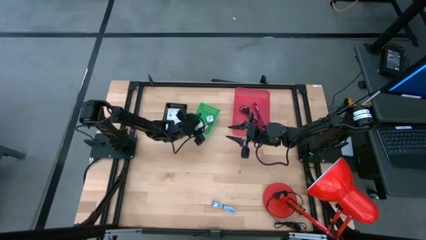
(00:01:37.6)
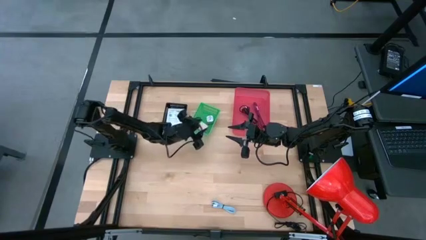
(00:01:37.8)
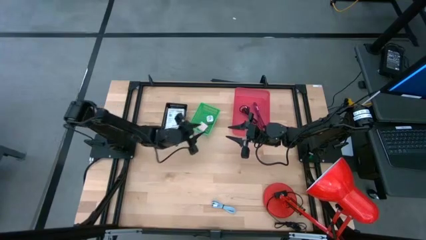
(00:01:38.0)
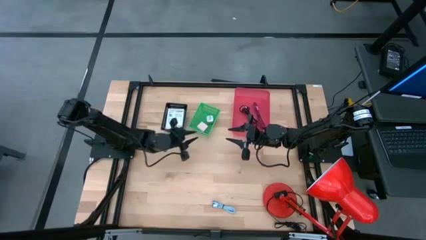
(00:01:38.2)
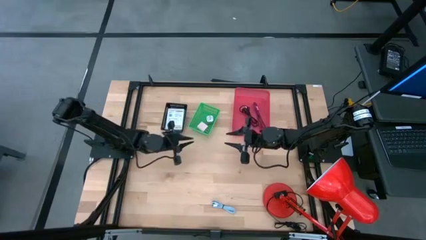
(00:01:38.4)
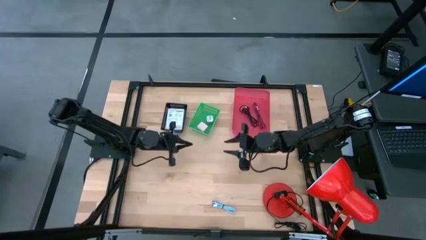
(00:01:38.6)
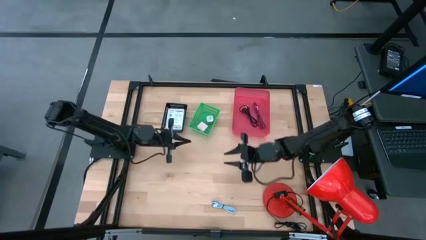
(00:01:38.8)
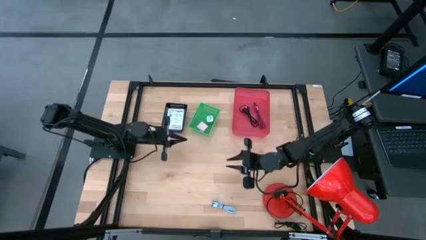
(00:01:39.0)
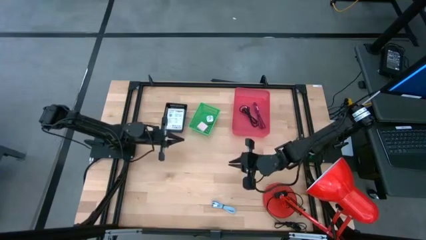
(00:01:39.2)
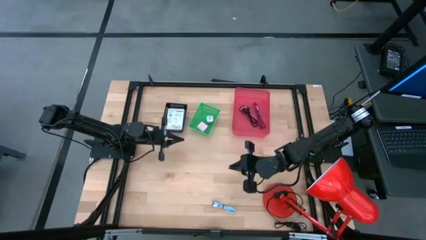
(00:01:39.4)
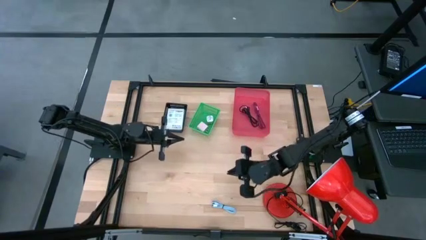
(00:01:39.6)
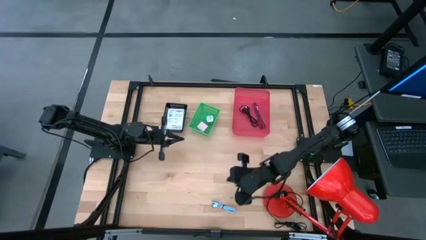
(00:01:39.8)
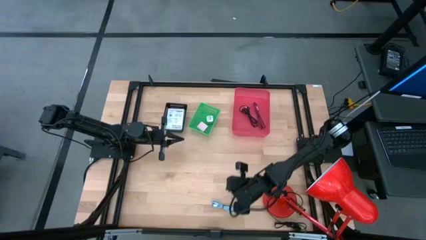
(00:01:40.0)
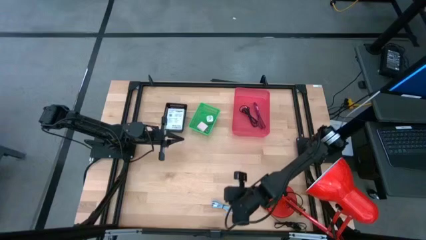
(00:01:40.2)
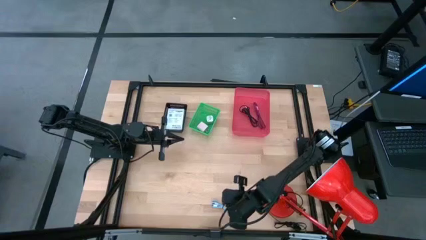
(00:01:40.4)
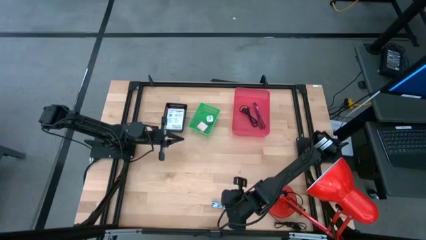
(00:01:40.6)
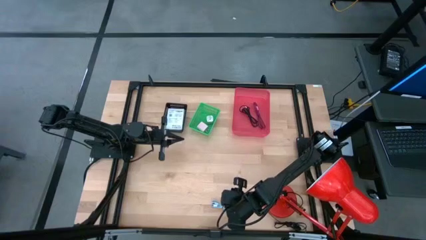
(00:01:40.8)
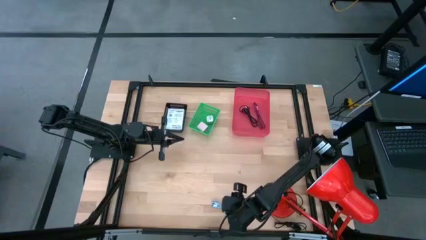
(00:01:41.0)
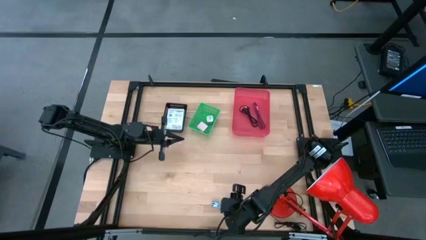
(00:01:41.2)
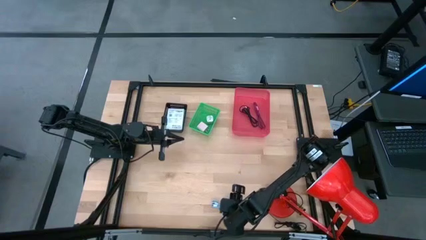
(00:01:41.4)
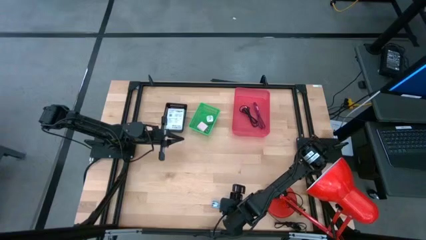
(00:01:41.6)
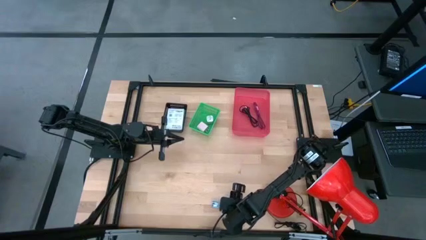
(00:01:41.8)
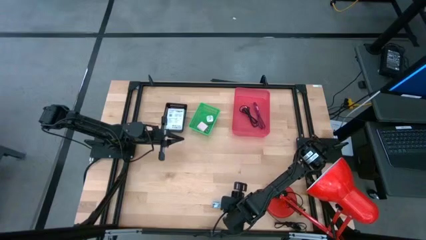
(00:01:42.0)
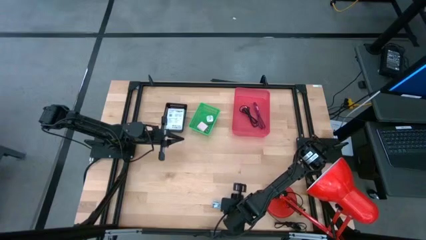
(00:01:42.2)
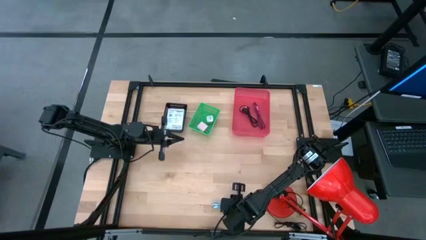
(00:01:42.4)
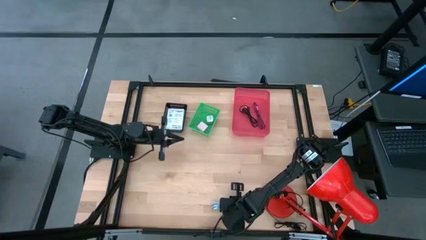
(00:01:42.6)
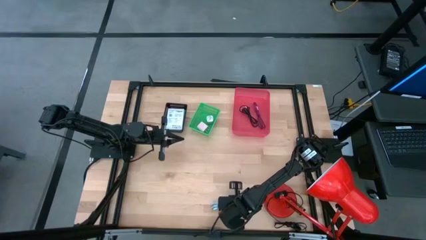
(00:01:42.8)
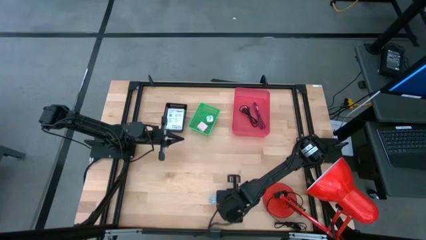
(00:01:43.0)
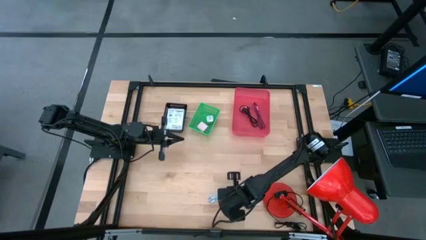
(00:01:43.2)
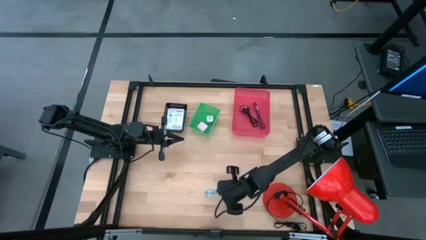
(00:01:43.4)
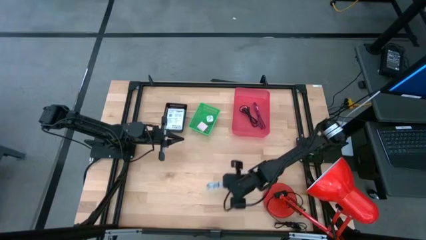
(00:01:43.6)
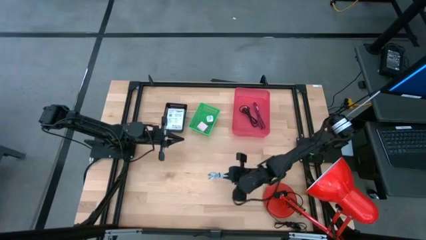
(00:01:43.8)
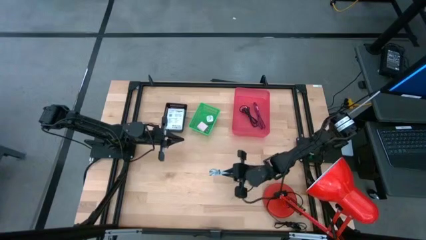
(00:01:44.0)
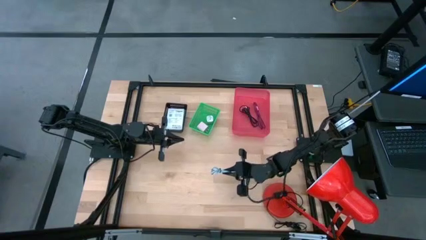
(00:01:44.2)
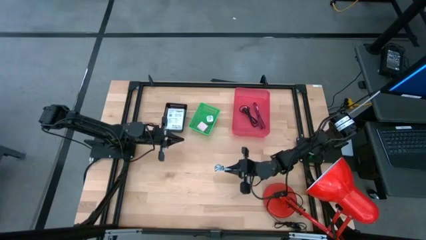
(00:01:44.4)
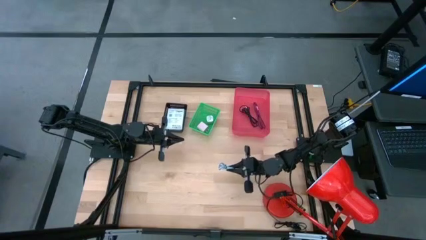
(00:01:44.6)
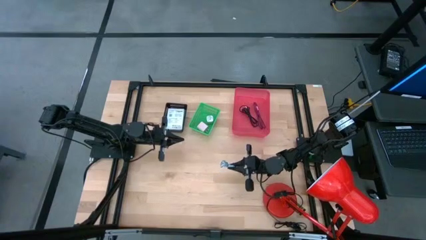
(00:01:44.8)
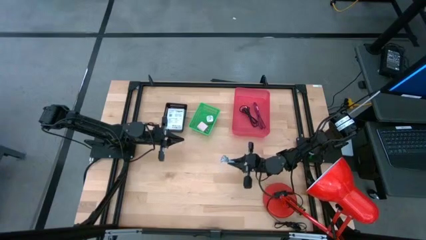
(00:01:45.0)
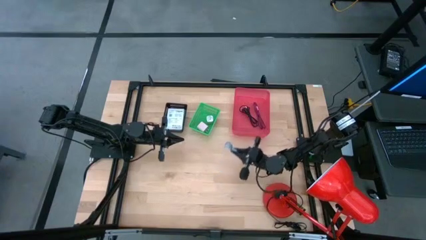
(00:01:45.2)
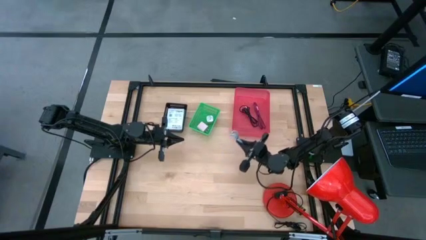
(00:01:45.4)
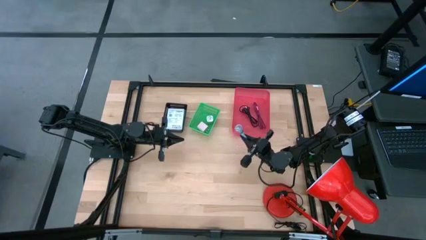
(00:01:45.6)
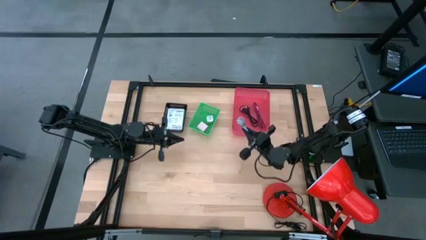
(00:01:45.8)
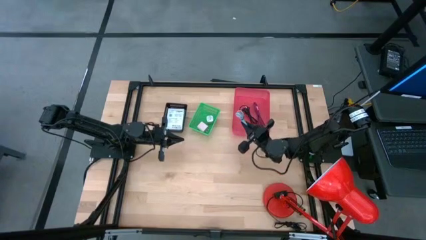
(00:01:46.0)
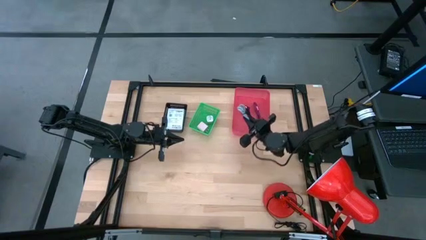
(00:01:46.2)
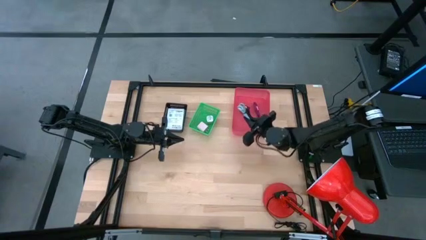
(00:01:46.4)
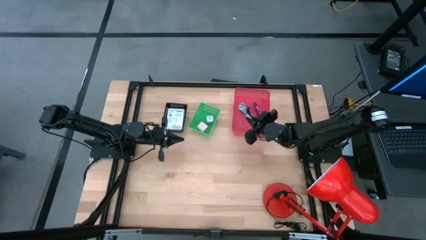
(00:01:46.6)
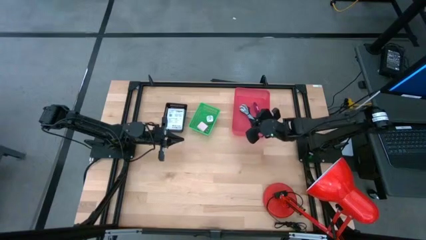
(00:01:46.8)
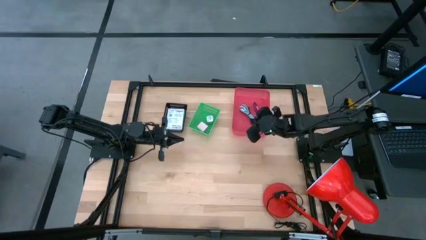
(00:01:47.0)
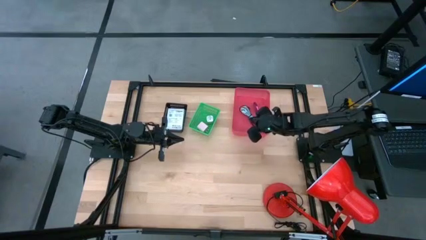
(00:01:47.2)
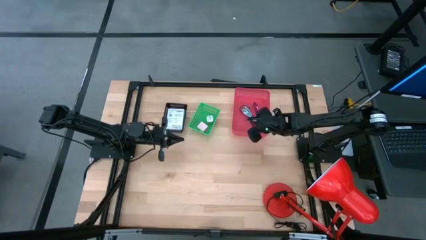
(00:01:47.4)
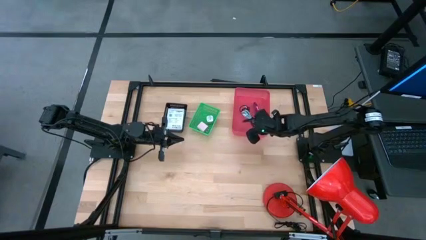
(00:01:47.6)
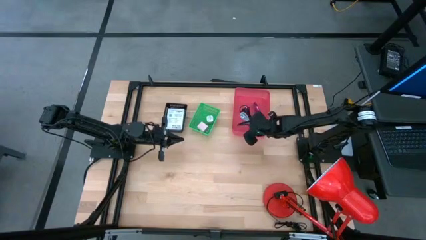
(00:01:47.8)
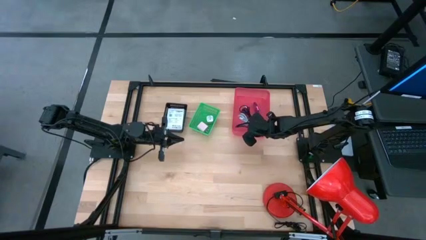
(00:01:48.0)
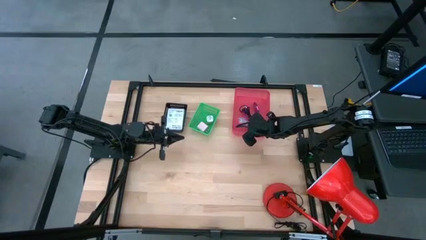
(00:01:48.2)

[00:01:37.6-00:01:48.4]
Task: Pick and place items into bin
Put the blue charger cable into the red bin

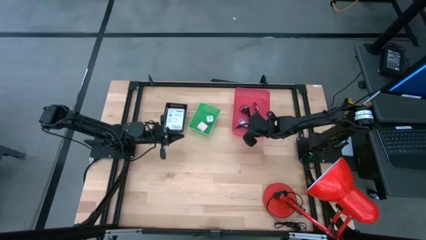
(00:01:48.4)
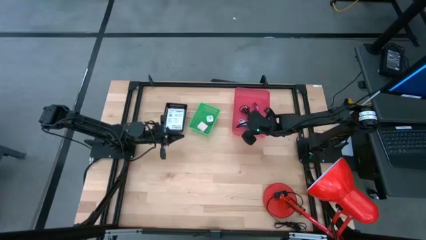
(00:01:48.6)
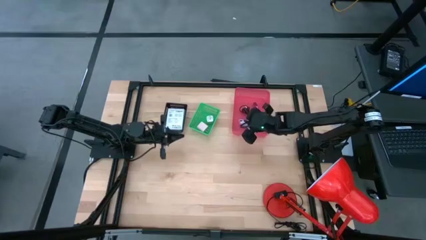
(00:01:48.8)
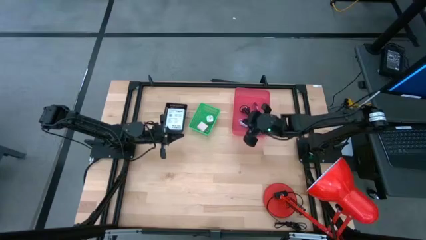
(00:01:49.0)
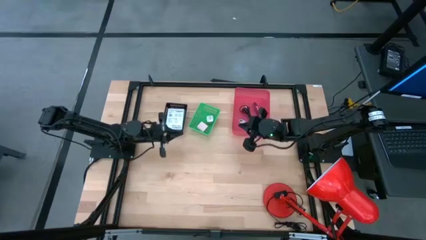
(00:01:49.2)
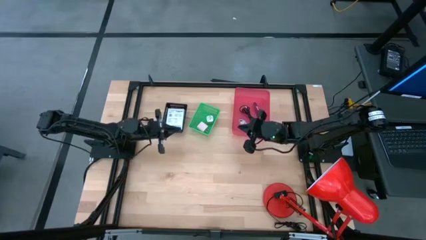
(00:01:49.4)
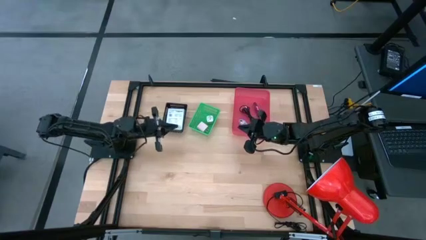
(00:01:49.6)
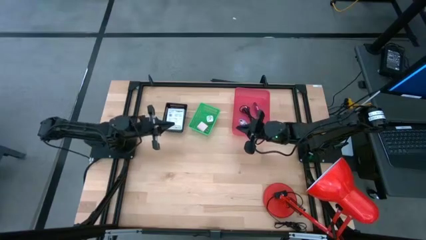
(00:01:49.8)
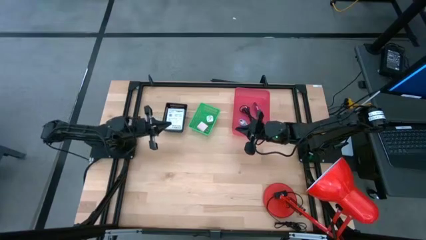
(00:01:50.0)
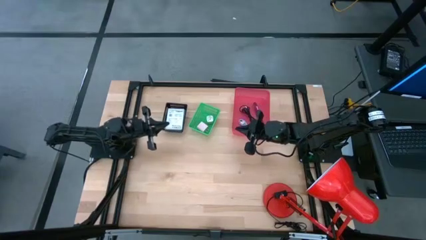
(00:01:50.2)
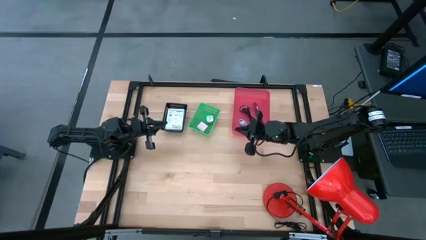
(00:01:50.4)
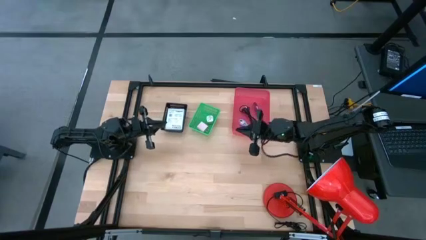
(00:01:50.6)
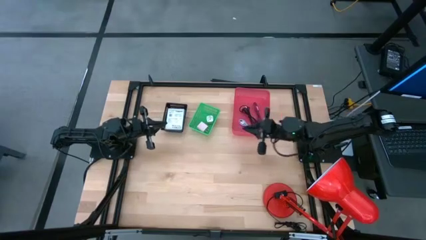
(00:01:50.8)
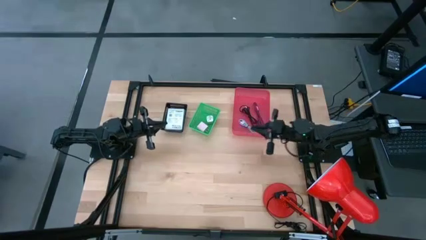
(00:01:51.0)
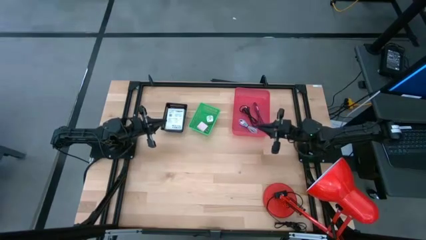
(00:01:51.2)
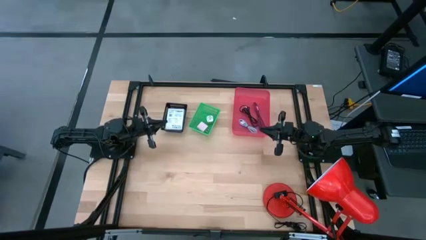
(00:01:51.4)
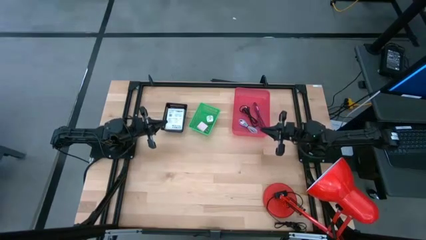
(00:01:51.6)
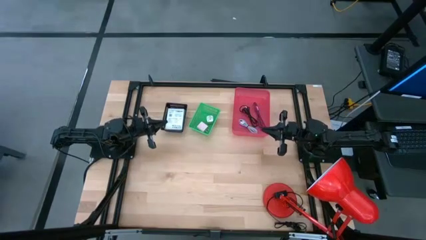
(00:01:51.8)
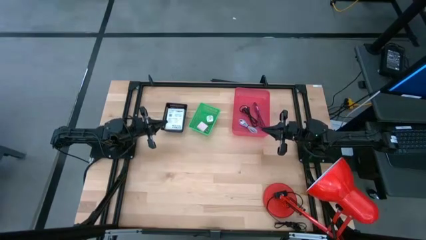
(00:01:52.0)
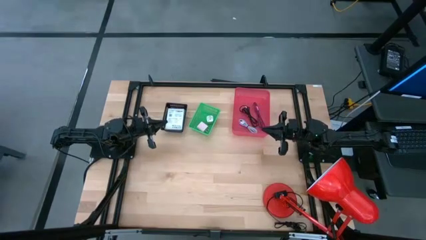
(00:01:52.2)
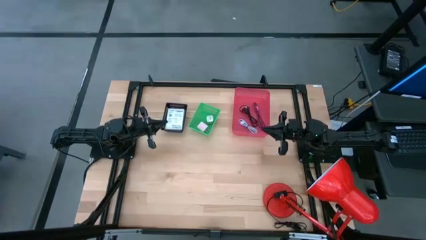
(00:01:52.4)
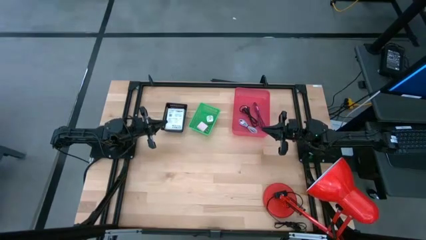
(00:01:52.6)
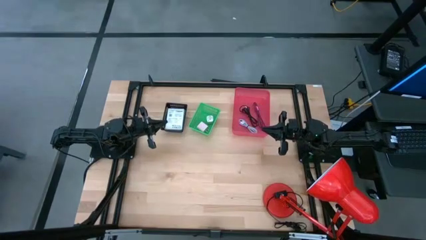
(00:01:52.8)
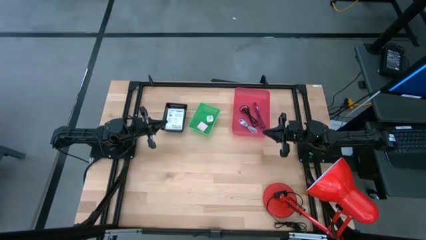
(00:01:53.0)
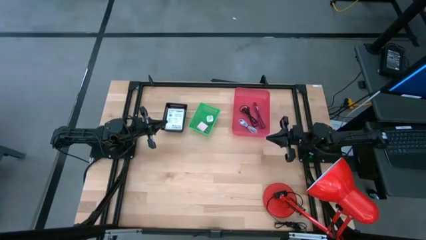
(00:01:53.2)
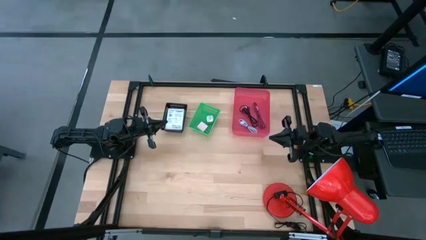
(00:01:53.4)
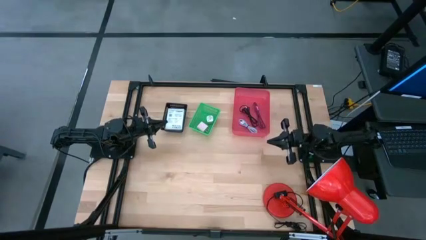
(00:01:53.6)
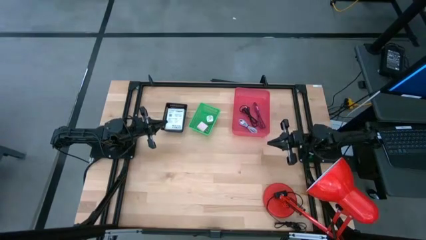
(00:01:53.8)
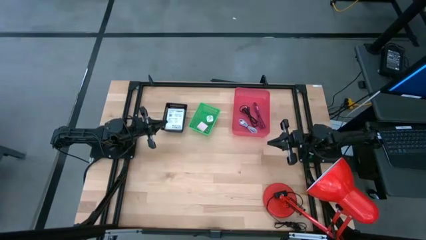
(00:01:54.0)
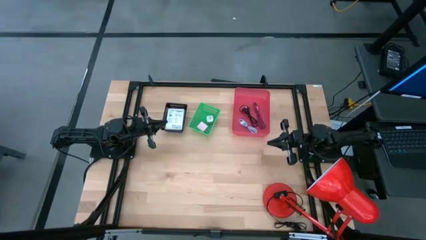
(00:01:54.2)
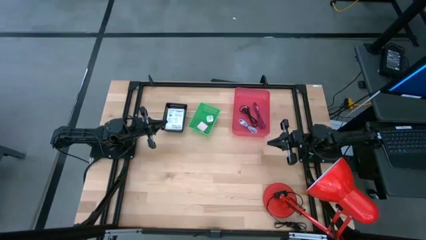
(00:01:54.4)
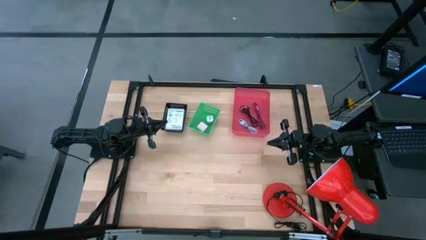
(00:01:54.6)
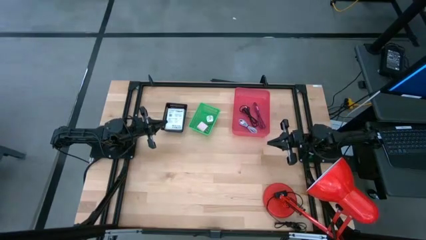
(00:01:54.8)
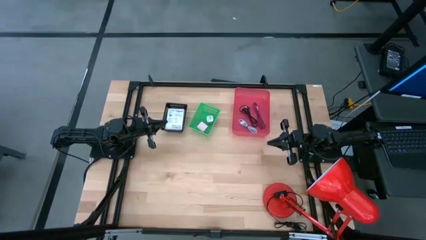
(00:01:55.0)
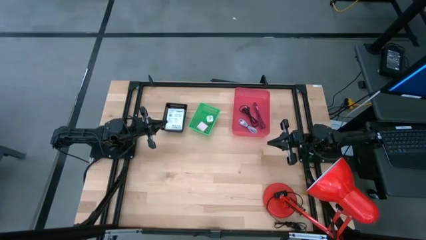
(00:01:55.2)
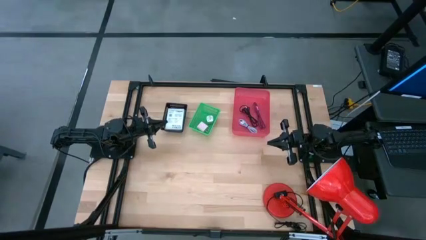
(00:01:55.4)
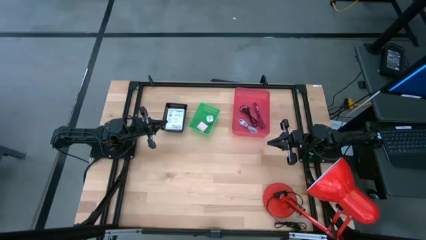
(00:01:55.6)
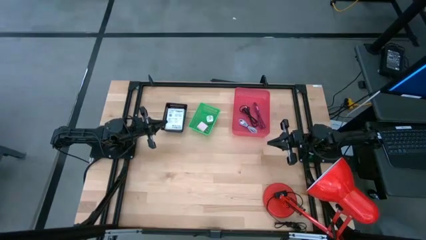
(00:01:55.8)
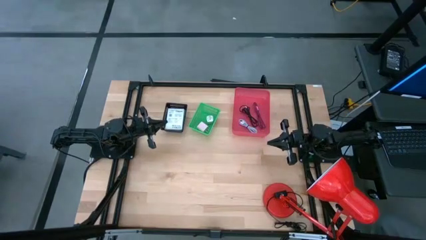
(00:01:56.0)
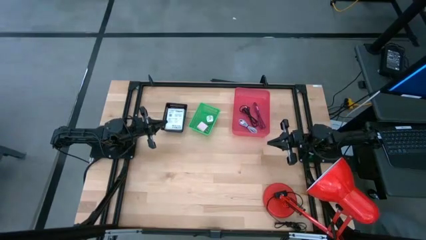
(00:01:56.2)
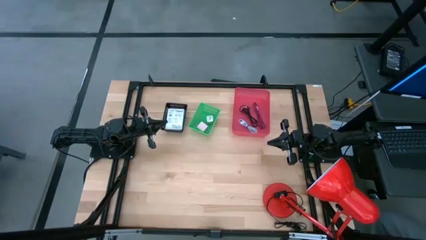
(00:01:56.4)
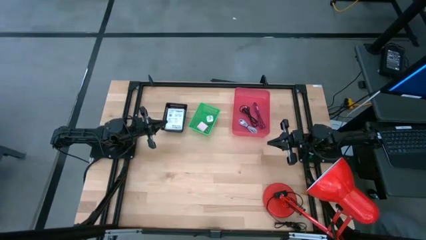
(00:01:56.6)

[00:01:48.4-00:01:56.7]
Return to Home Position
